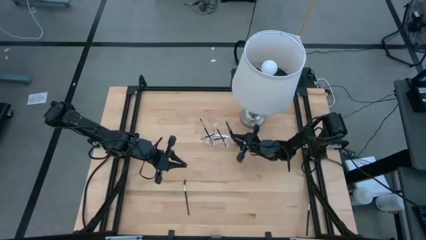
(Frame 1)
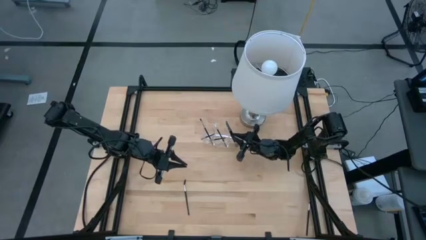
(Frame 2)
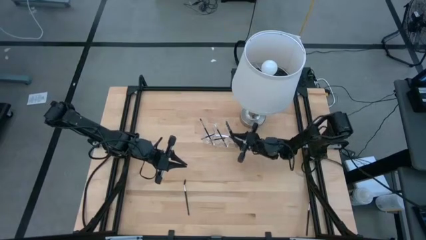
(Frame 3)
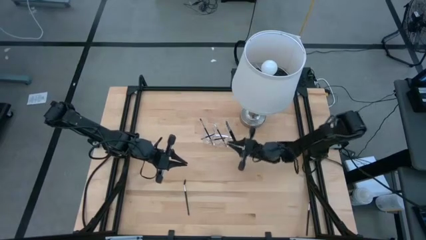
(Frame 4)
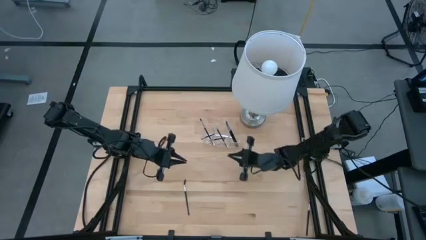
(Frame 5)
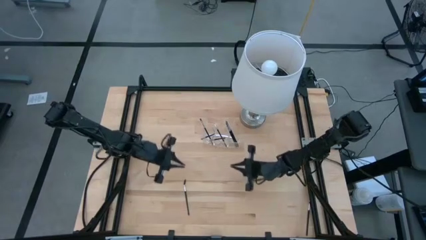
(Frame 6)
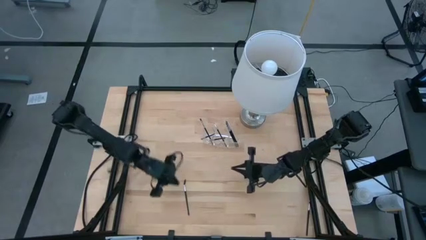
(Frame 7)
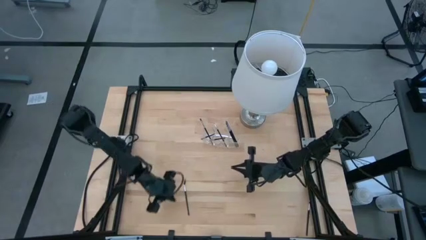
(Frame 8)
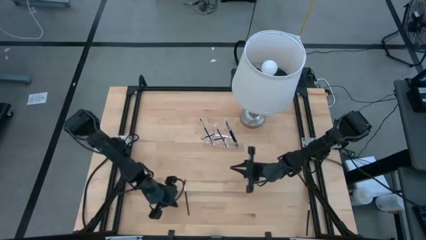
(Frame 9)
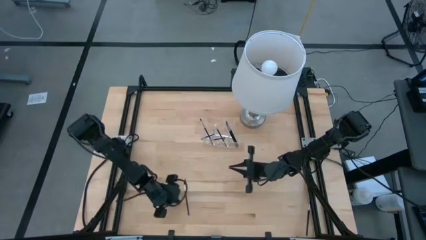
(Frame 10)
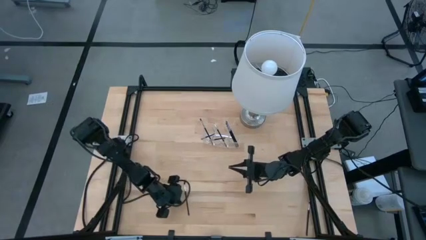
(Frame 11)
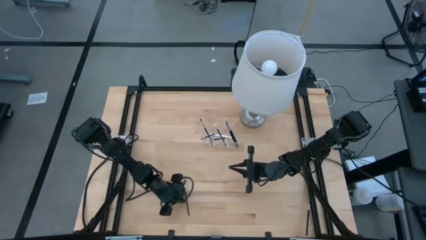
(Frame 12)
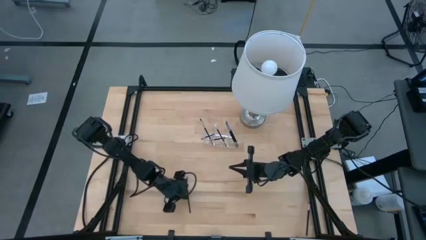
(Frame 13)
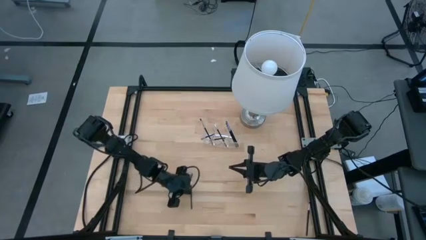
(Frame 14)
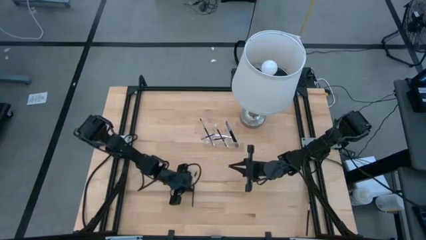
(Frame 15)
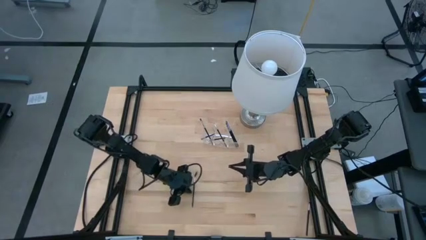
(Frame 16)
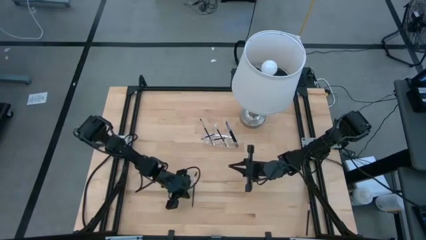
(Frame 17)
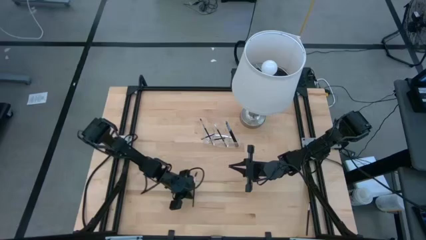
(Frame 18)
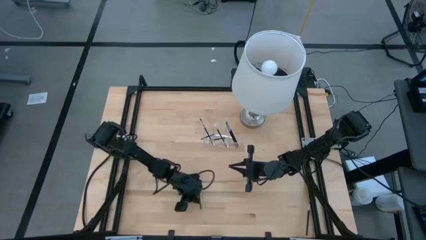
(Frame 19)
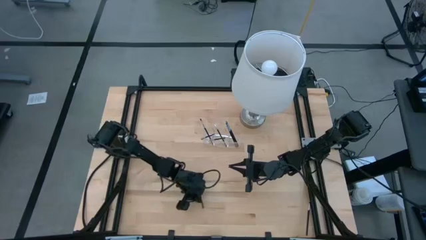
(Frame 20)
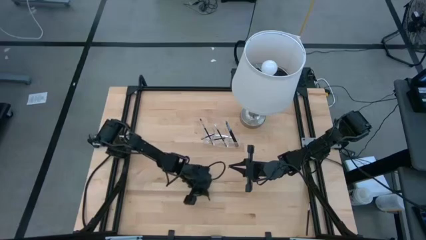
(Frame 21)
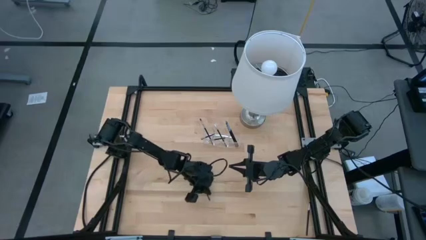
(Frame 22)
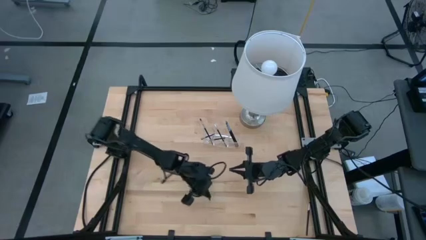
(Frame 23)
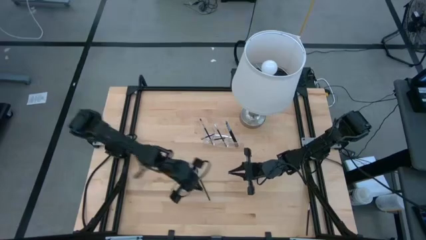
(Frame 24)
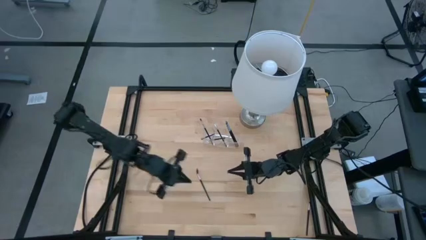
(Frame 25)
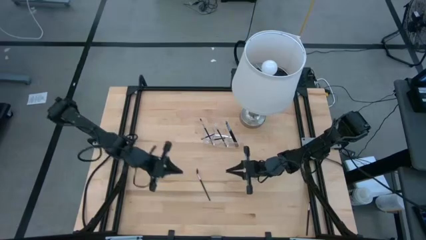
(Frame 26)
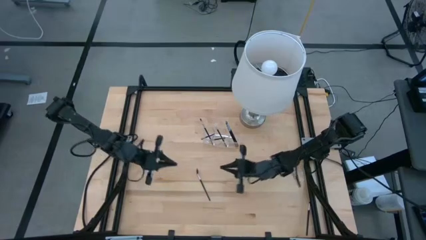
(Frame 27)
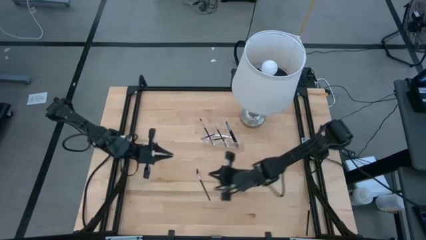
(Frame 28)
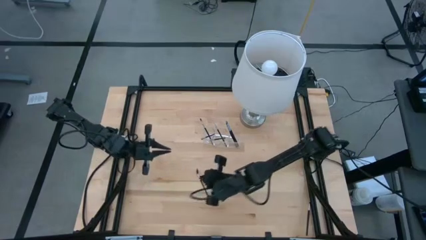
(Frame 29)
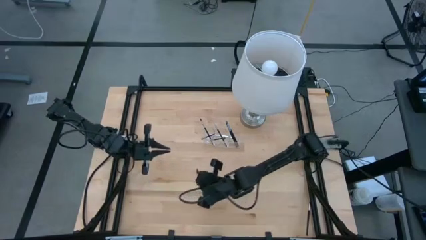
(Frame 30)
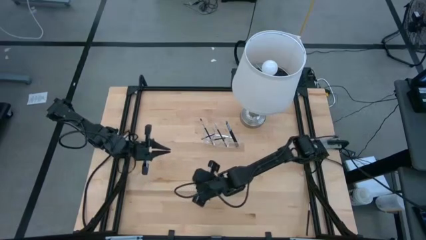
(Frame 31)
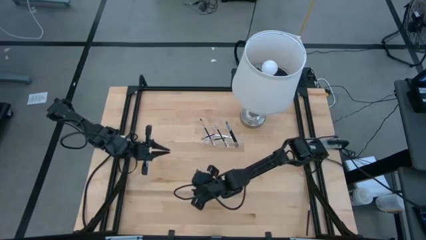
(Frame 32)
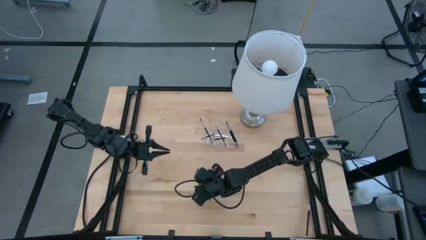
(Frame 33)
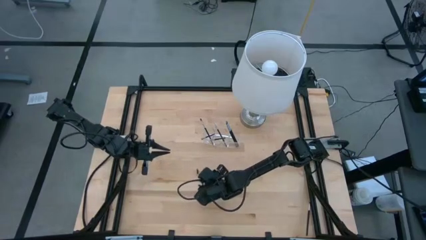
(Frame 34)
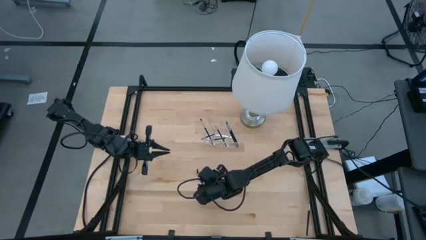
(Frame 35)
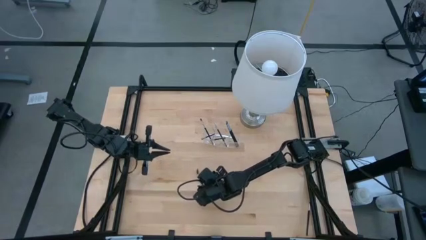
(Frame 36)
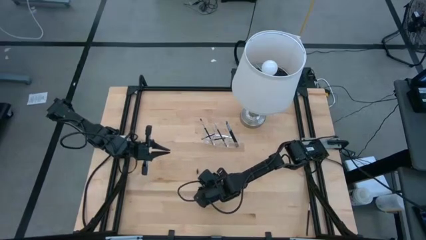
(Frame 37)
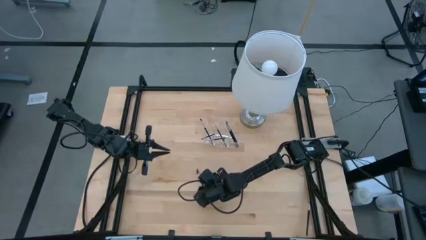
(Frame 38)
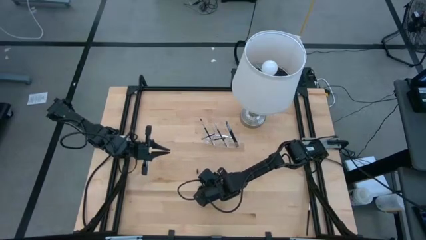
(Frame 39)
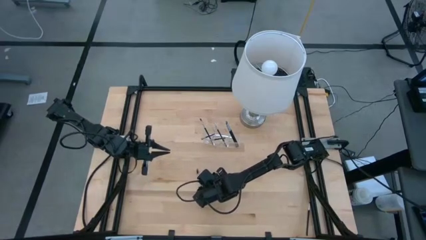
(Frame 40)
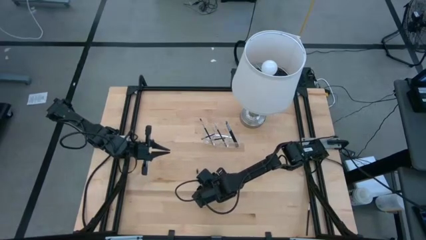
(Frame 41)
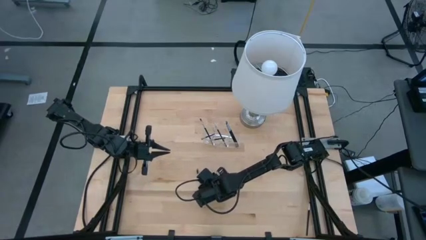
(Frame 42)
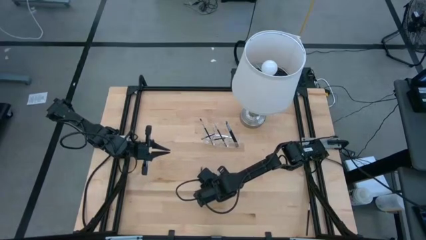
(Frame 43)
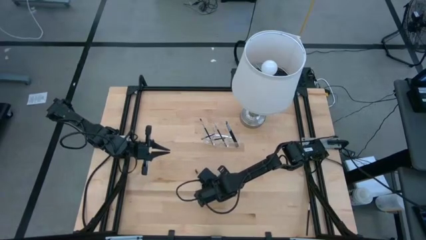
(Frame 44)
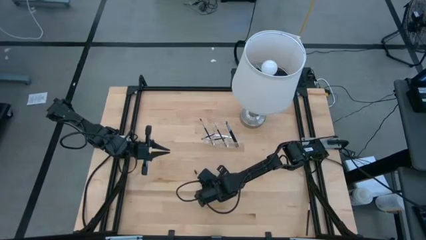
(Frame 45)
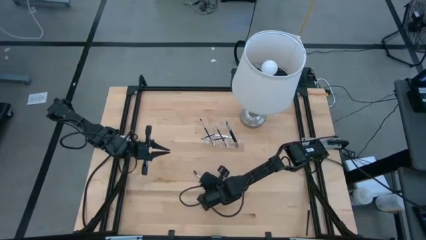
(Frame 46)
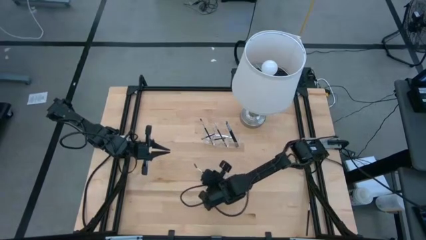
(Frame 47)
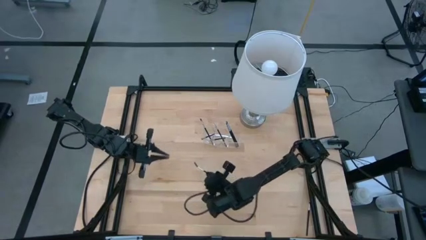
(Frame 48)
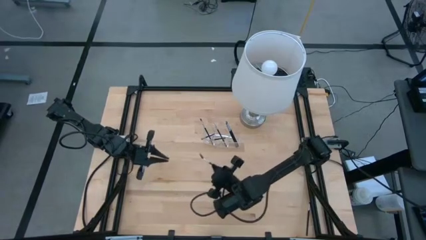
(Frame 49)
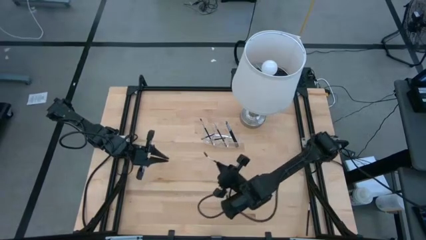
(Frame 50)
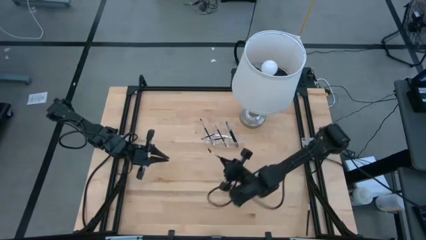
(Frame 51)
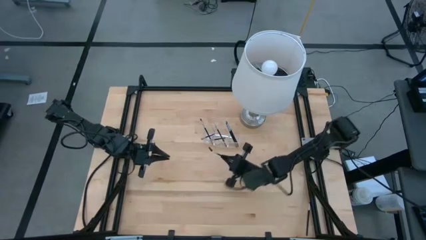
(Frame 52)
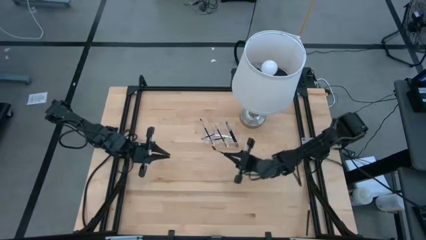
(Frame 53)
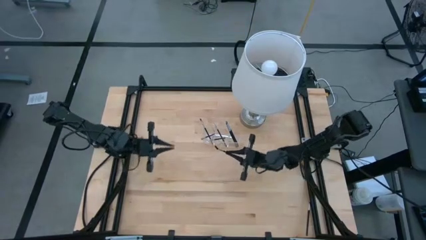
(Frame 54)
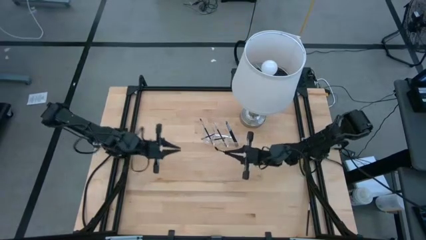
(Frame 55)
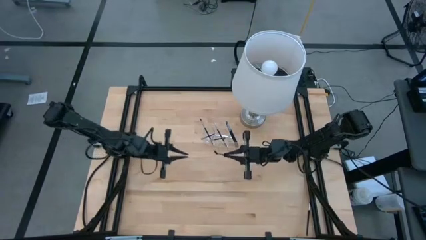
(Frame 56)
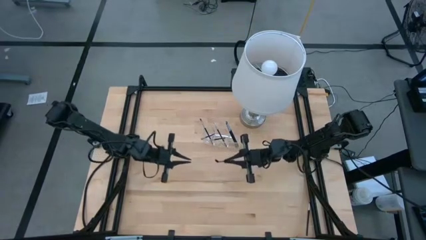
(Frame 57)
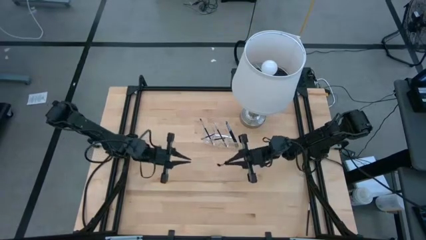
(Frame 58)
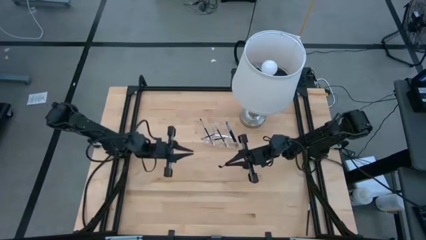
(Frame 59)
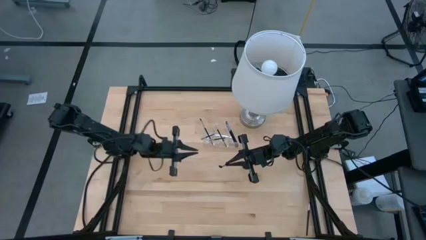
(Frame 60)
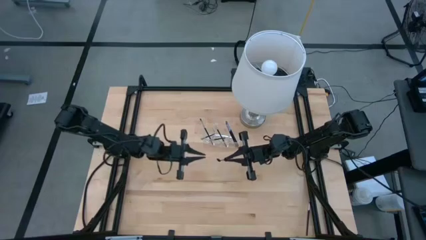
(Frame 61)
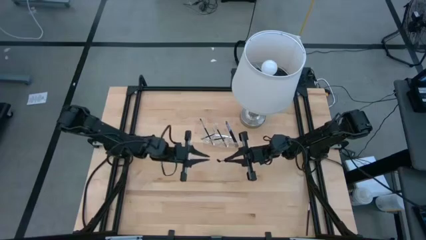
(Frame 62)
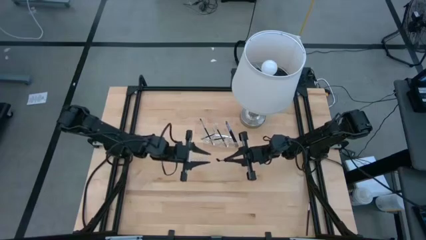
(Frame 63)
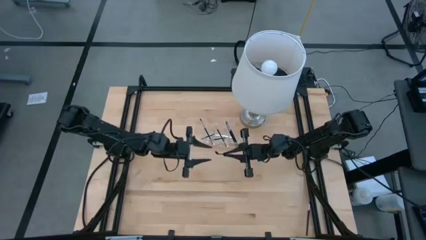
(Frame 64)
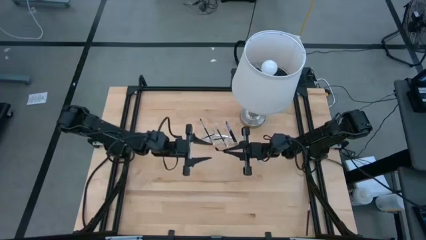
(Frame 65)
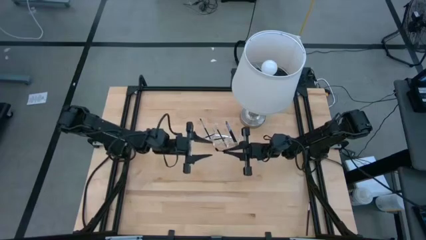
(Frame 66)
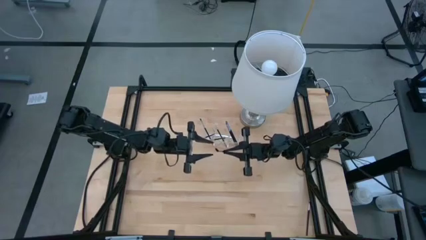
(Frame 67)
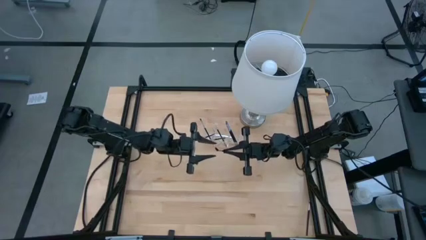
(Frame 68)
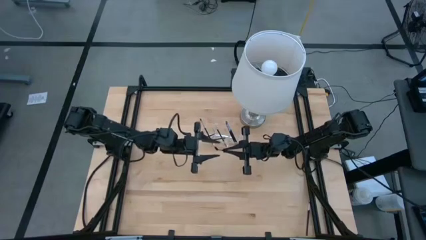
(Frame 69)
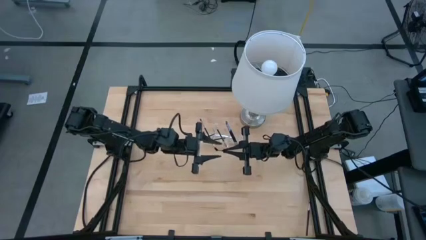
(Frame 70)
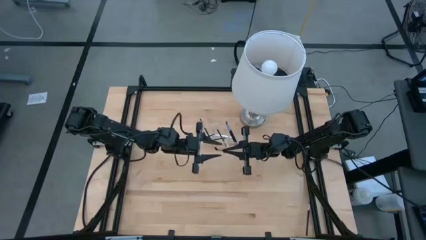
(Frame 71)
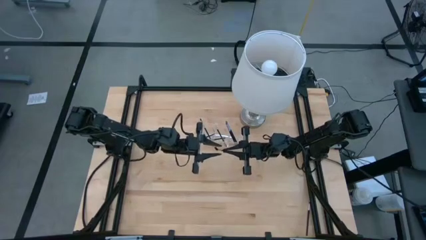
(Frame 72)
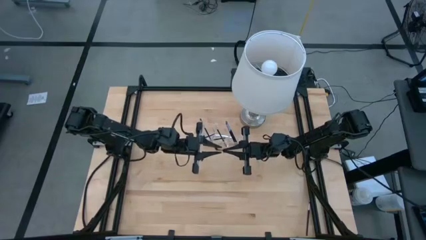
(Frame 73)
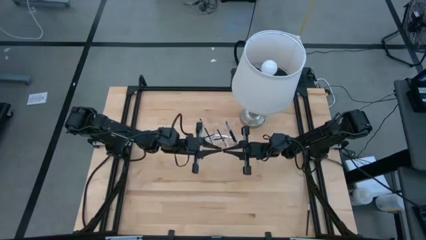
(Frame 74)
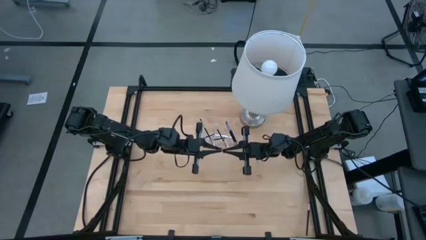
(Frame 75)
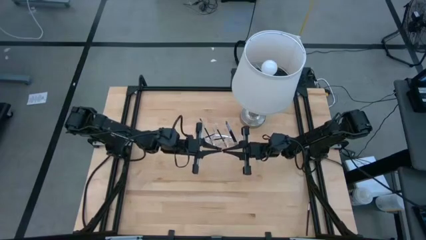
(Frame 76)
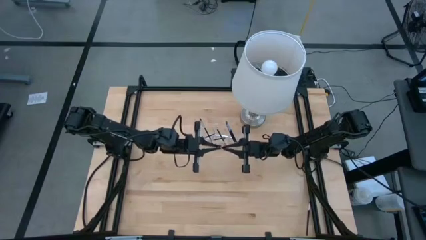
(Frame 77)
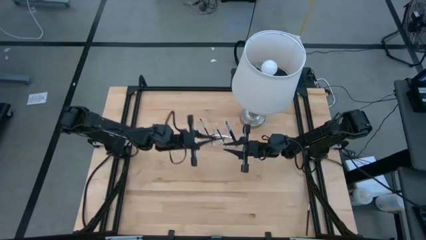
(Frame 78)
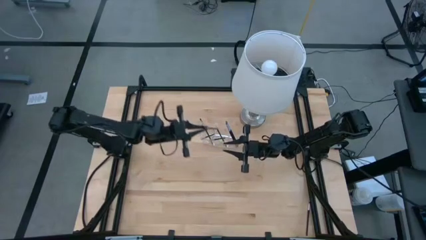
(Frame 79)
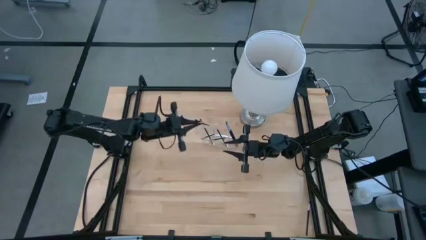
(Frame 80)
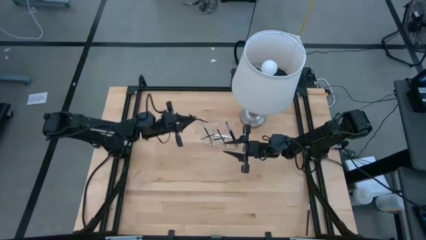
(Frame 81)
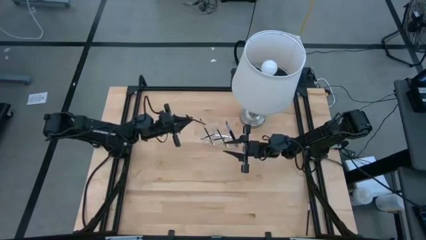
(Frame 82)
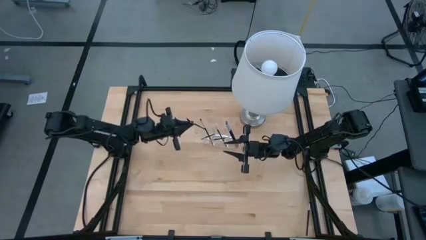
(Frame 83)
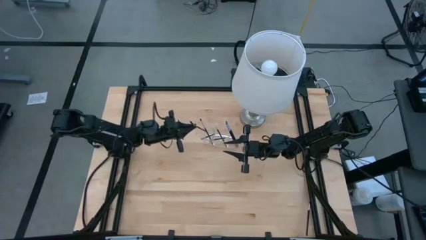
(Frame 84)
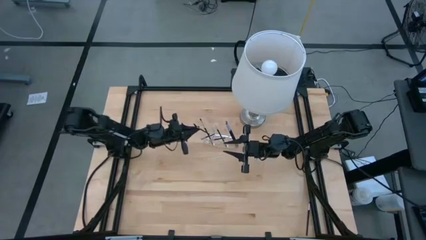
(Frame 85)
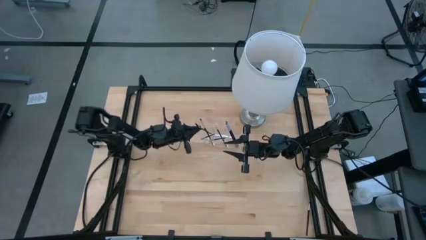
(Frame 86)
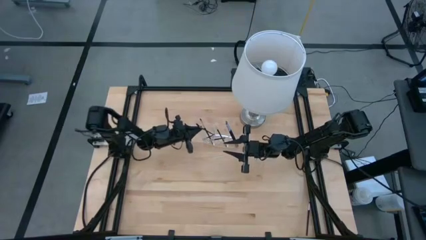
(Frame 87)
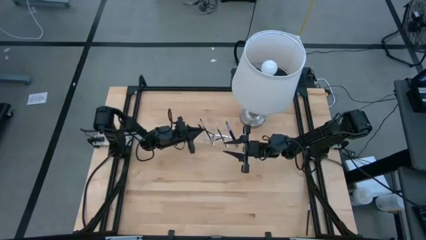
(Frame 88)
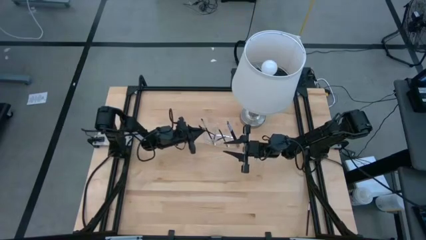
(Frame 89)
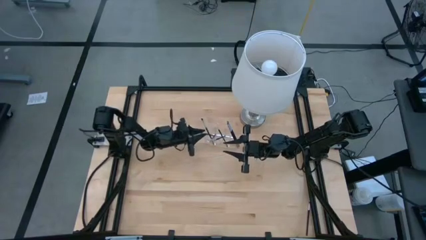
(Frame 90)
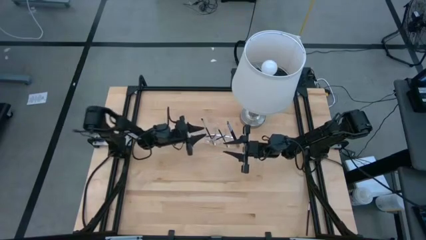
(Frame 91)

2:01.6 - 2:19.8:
Task: Pick & Place Makeup Brushes
Put the black brow brush into the transparent organizer
